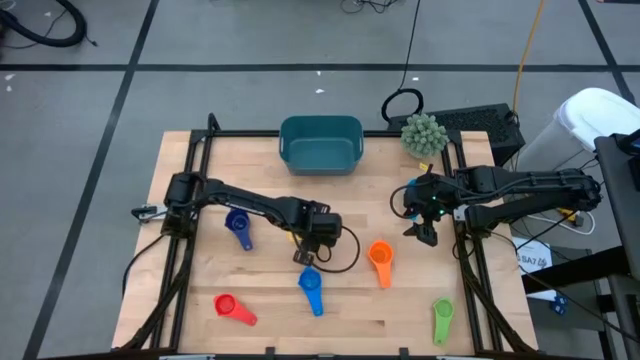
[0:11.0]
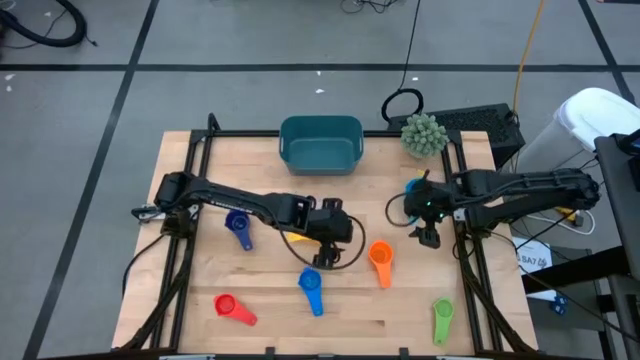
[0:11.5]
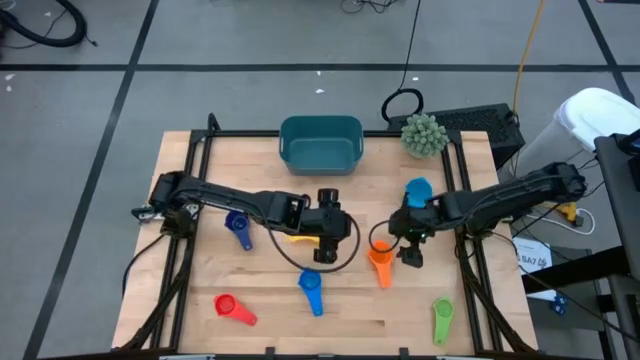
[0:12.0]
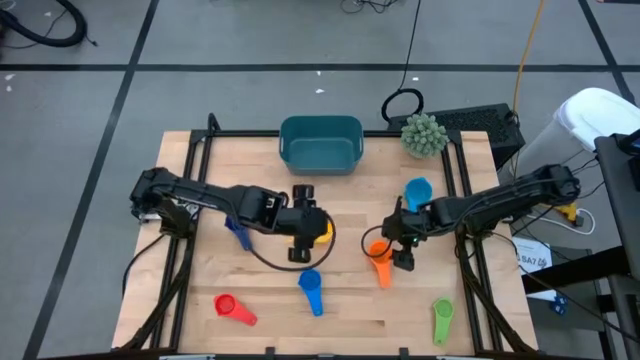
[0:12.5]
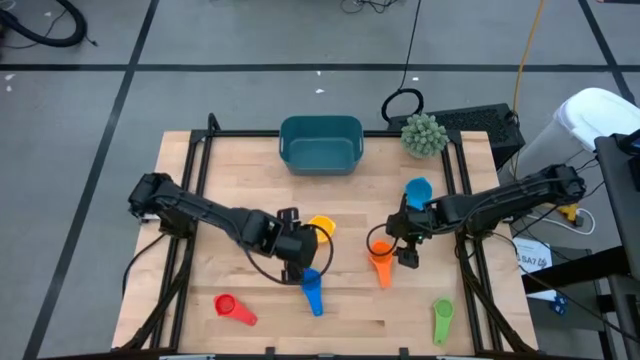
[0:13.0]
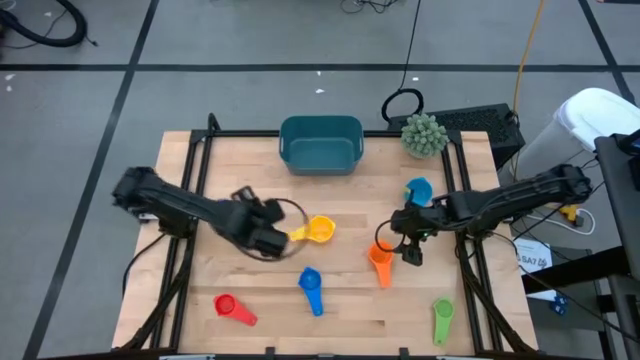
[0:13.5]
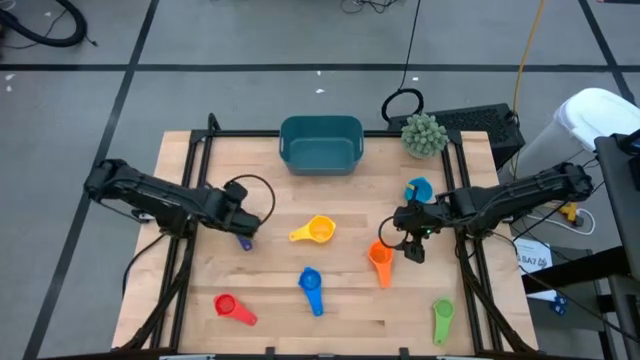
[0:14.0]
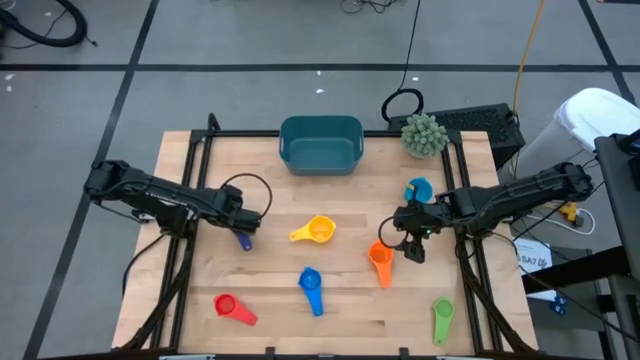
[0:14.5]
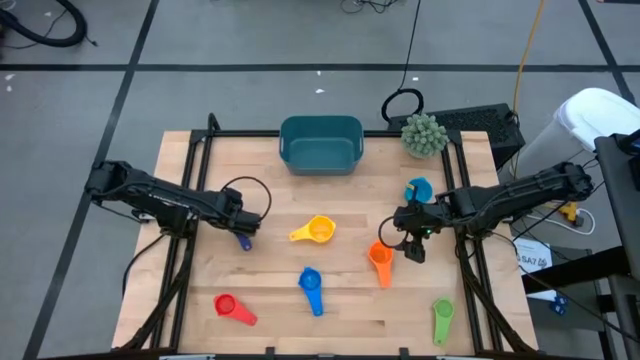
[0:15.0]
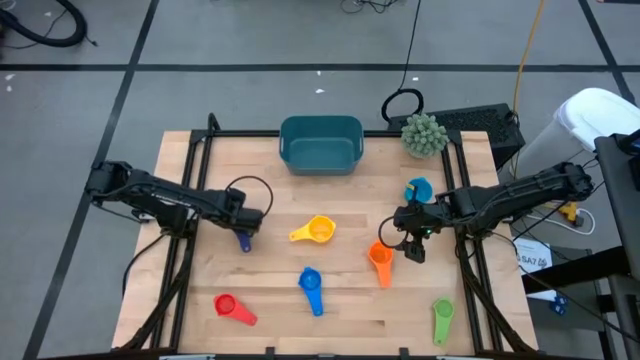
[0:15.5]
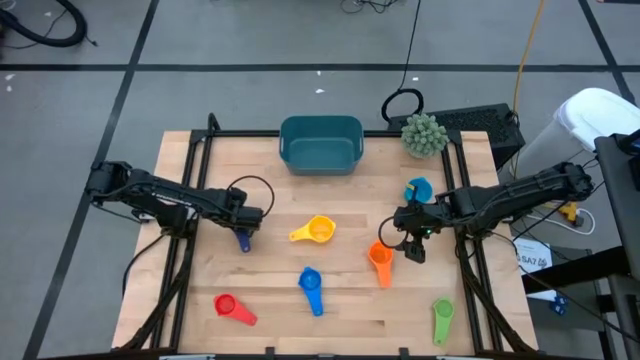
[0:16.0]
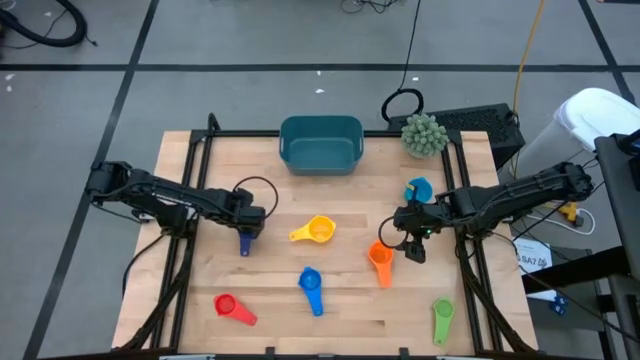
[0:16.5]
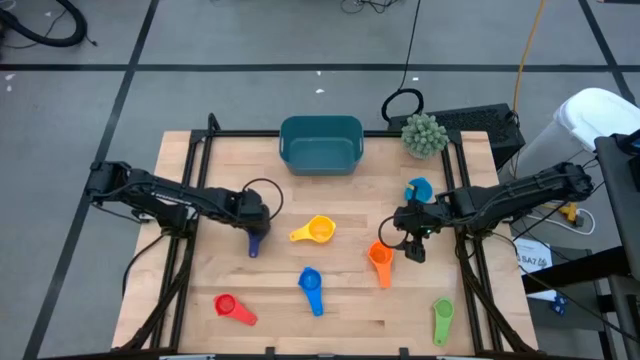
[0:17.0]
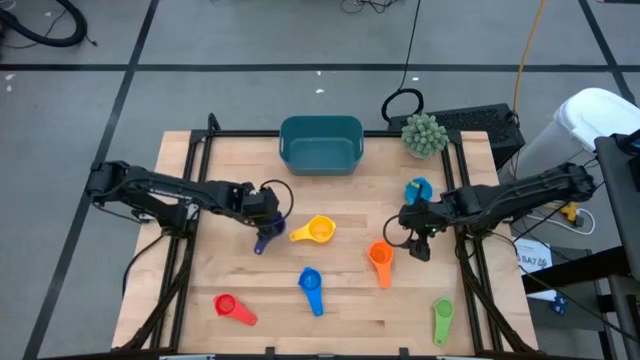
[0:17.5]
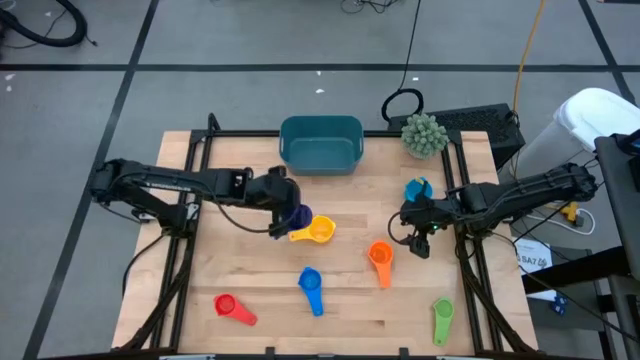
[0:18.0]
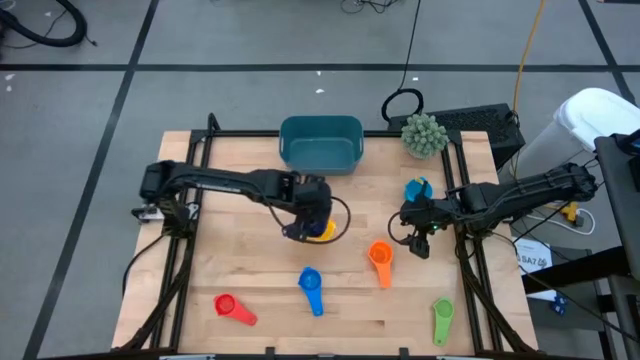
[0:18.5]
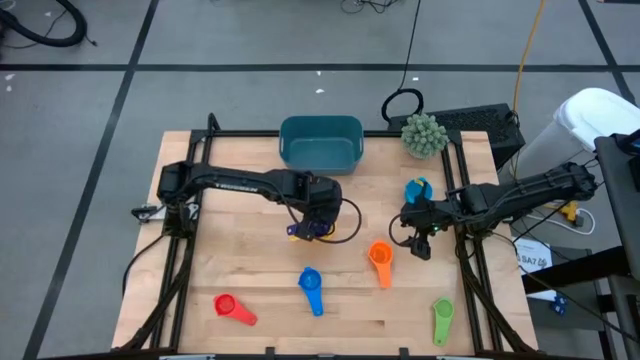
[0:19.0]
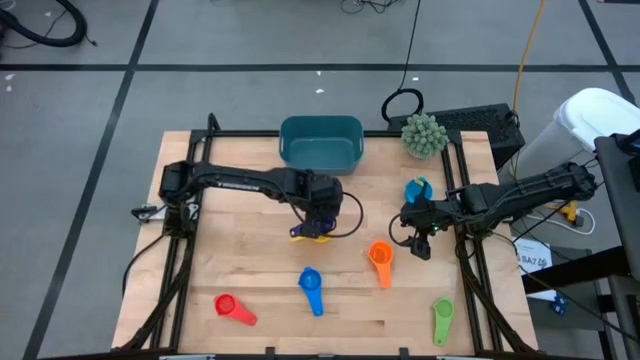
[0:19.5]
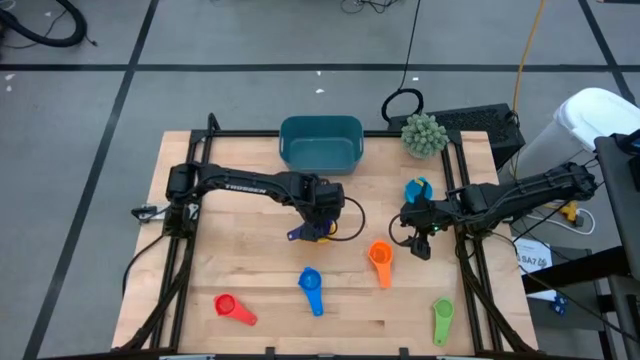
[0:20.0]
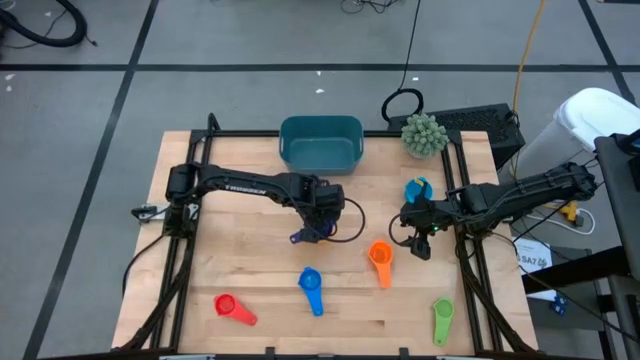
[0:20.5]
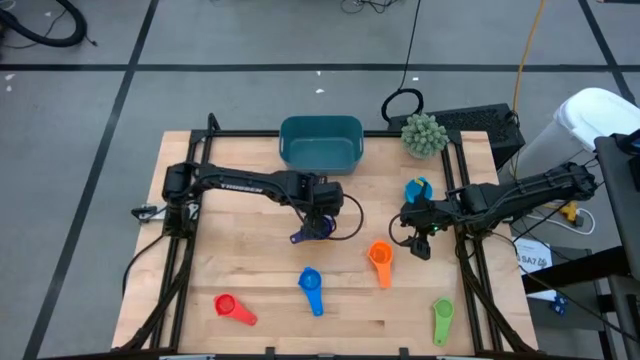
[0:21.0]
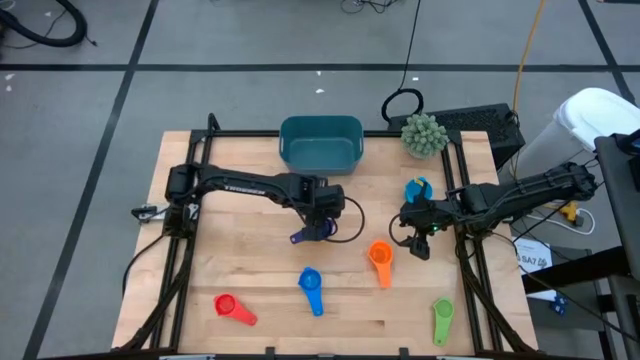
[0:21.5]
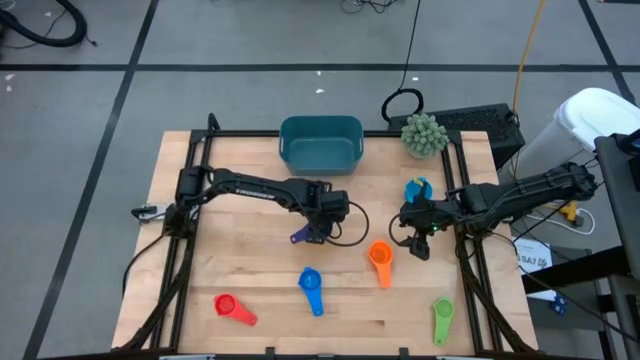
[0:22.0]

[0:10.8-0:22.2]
Task: Nest measuring cups in basket
Stack the dark blue measuring cup on top of the yellow measuring cup

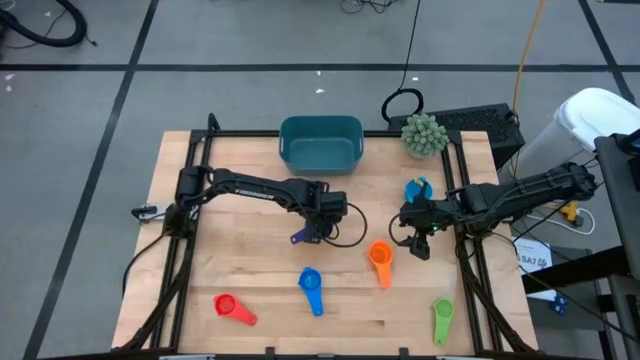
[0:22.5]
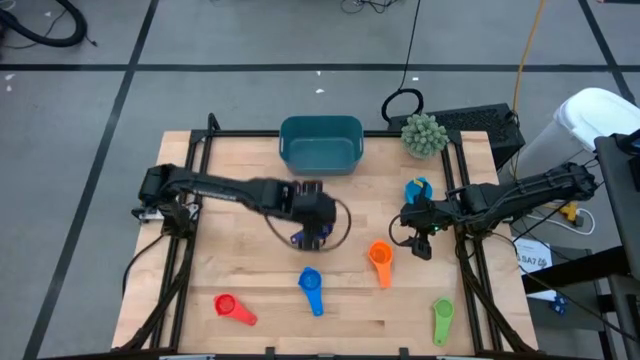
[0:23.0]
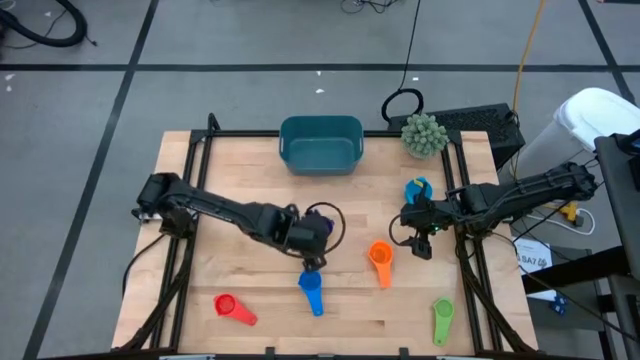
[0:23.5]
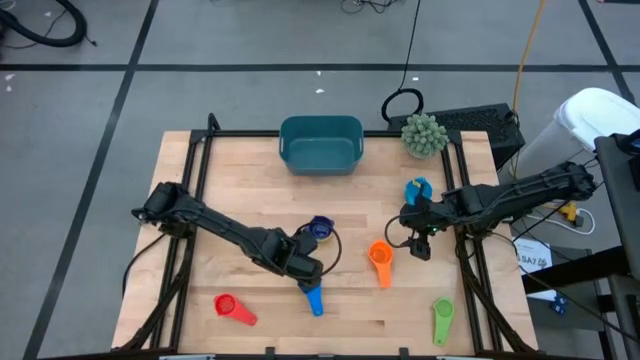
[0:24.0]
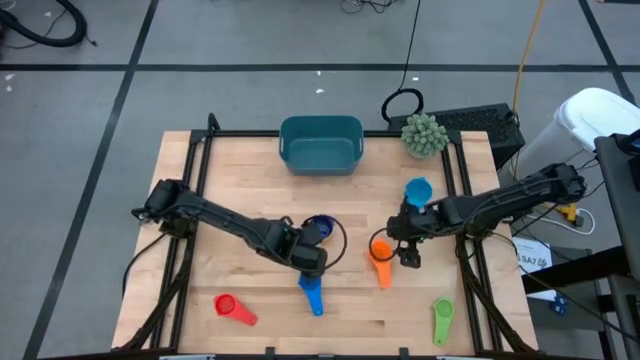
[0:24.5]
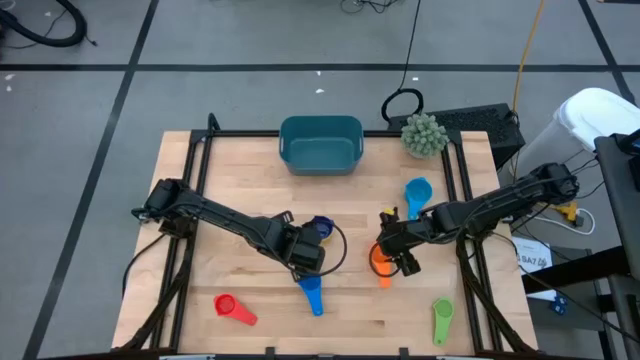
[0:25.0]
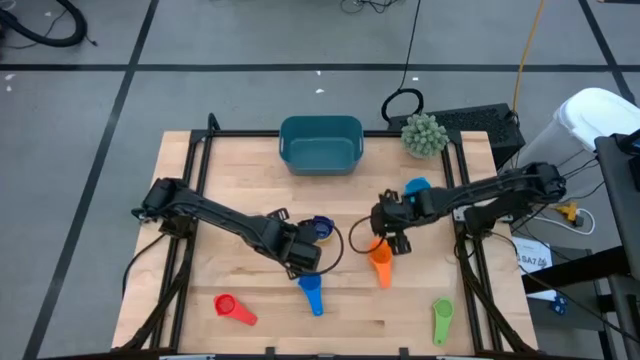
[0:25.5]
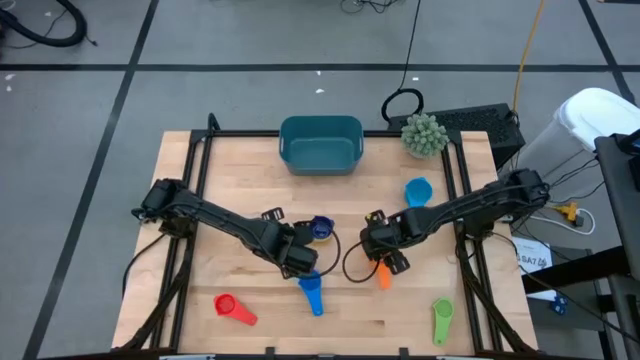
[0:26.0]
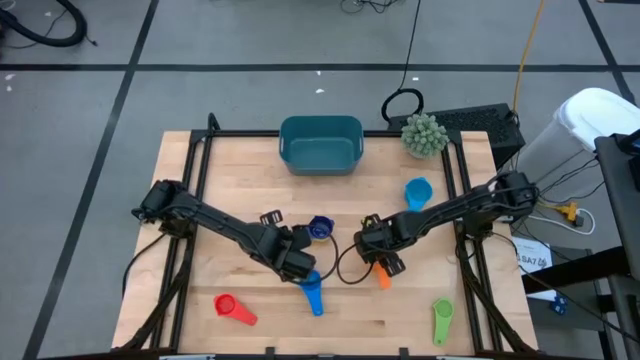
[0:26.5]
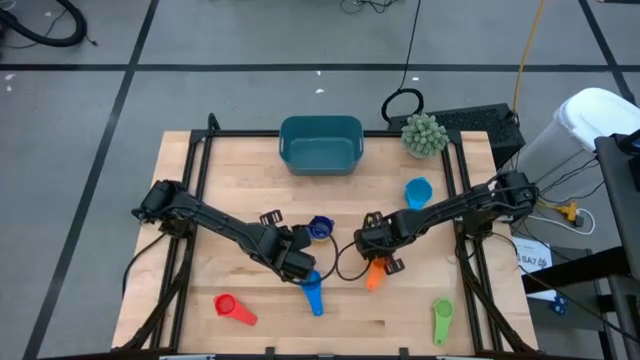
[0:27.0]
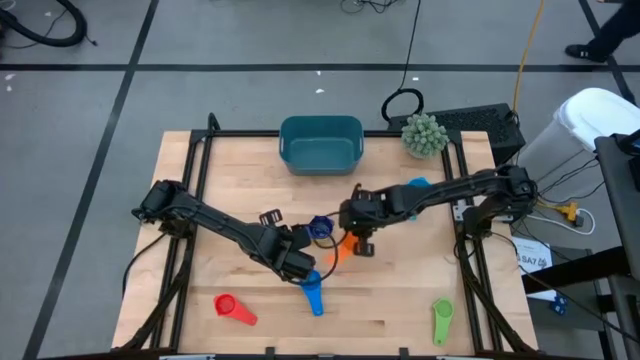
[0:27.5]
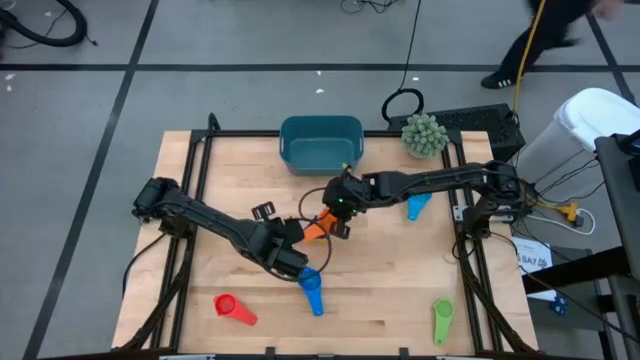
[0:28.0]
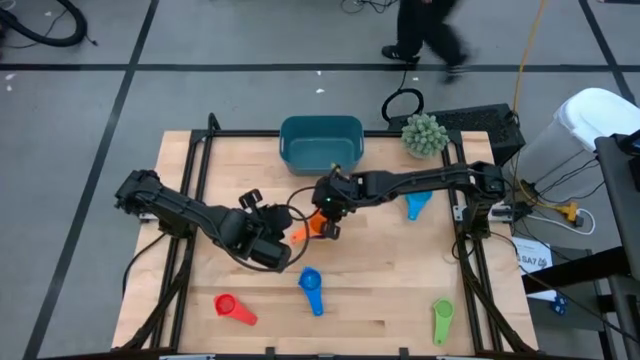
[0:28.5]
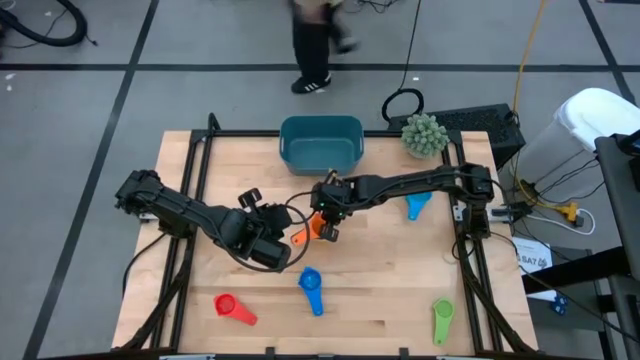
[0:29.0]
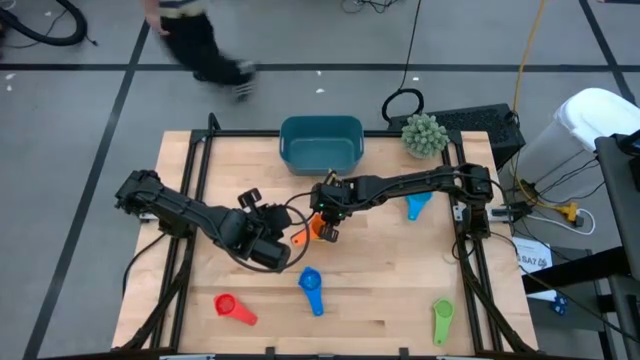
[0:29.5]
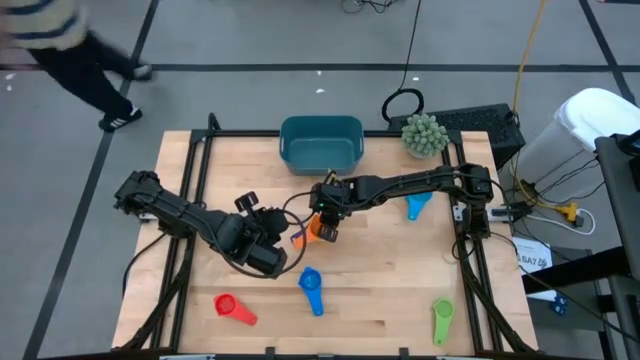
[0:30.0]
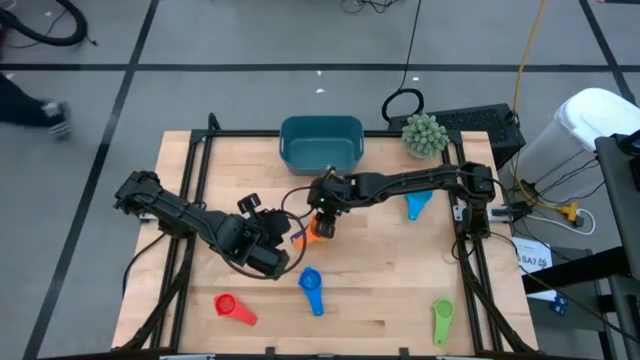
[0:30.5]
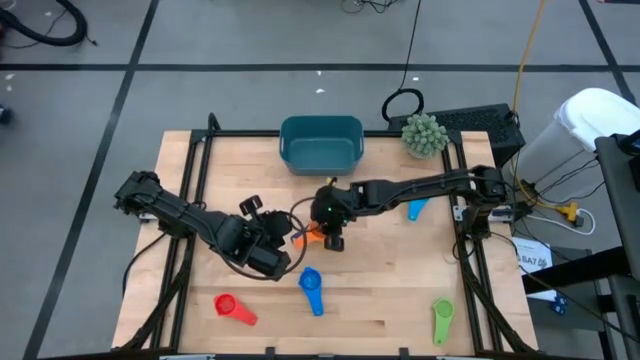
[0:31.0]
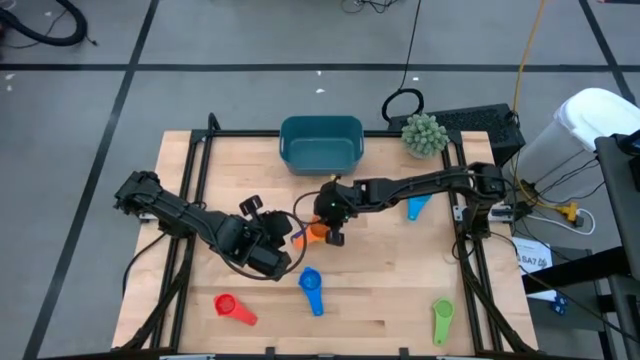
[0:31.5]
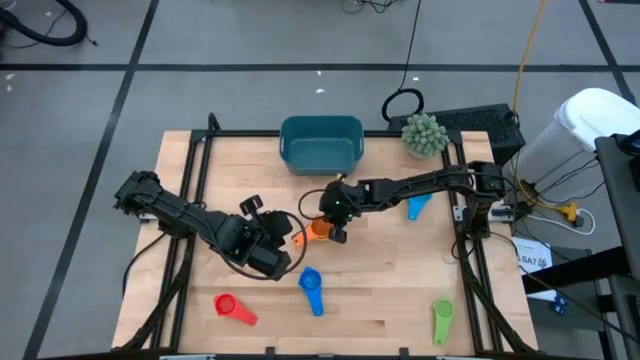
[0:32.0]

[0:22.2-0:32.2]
Stack the orange measuring cup on top of dark blue measuring cup
